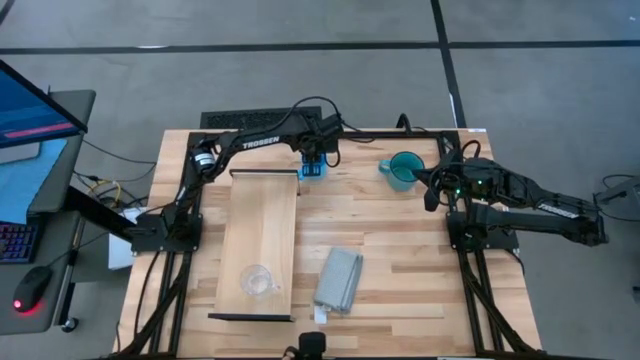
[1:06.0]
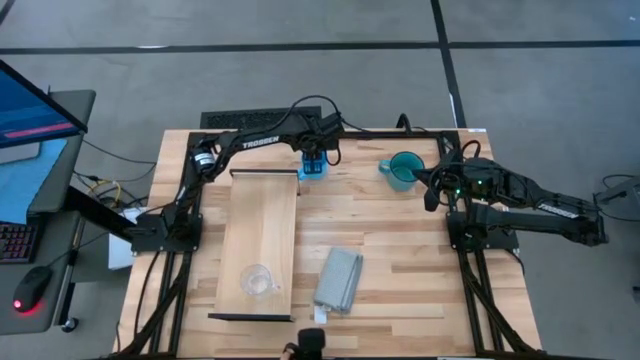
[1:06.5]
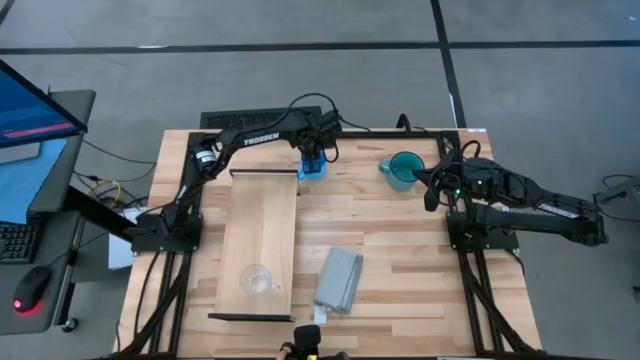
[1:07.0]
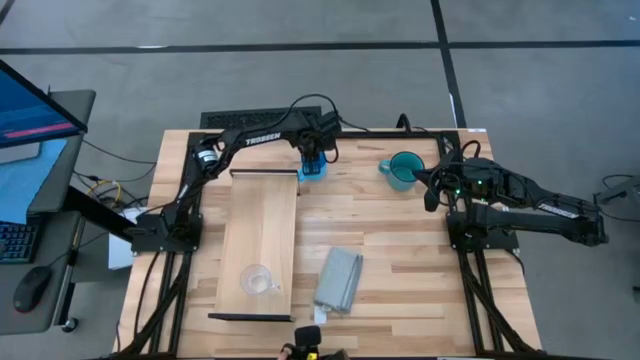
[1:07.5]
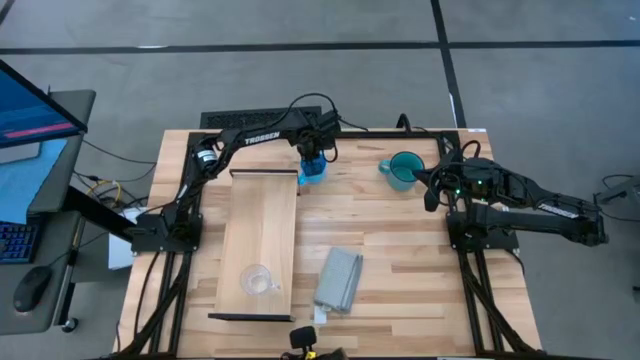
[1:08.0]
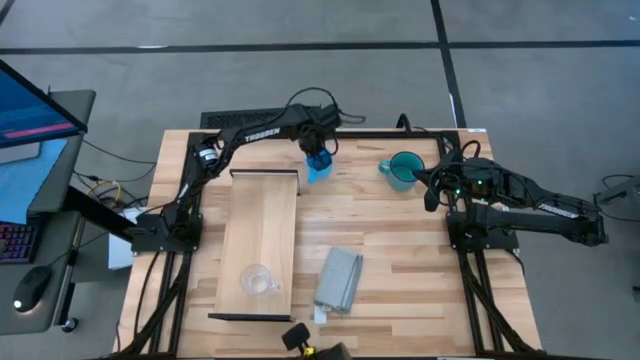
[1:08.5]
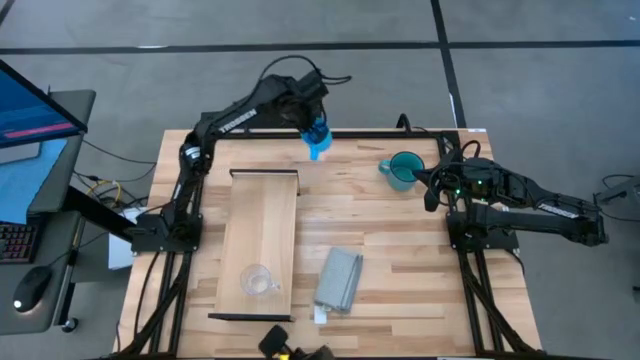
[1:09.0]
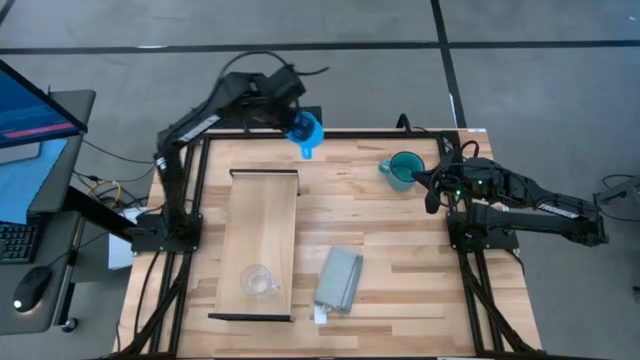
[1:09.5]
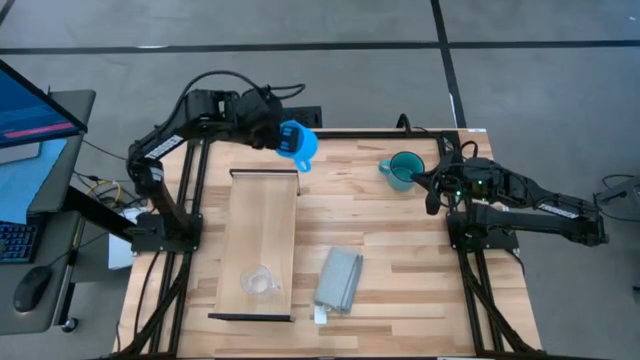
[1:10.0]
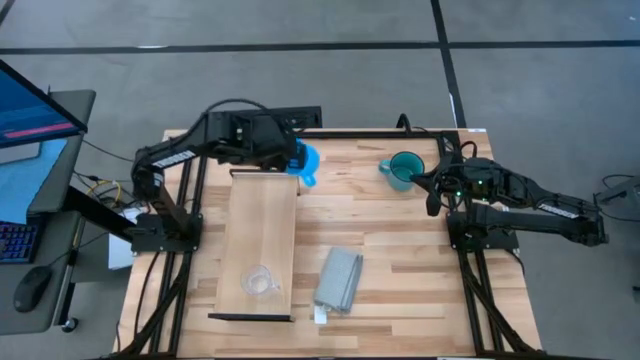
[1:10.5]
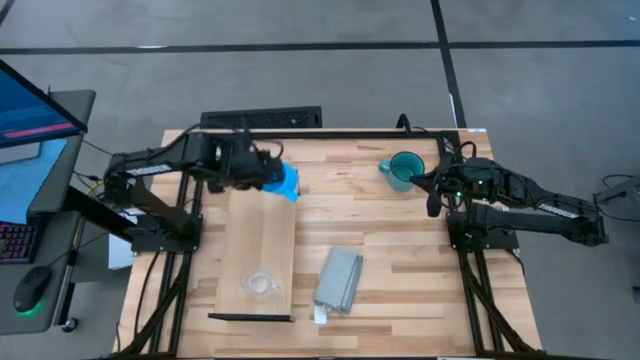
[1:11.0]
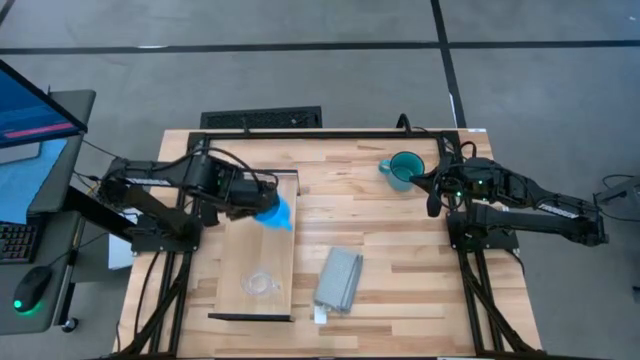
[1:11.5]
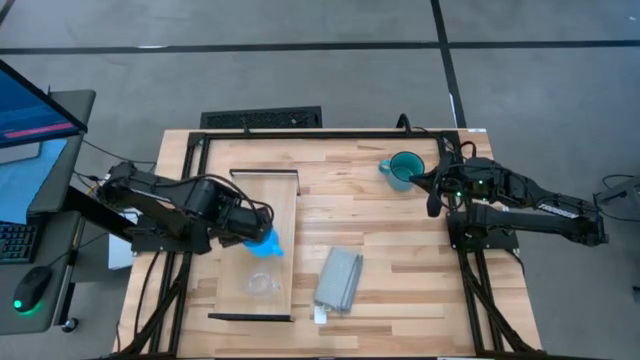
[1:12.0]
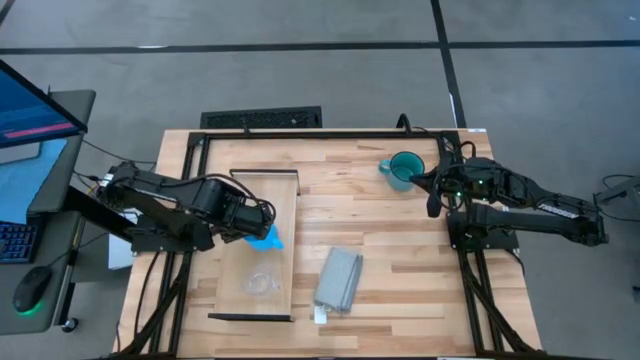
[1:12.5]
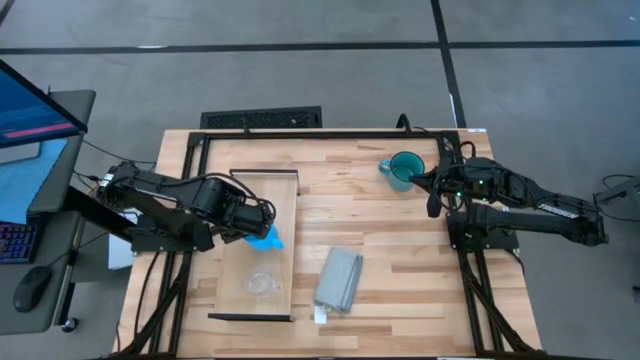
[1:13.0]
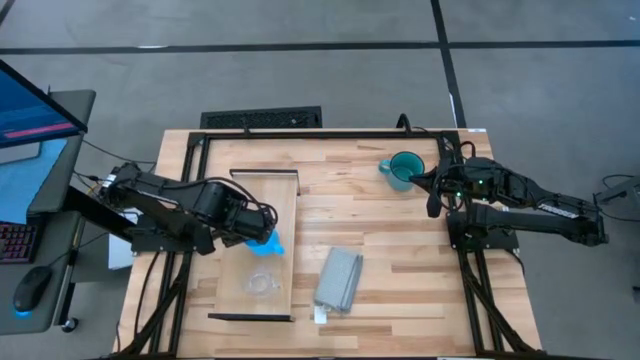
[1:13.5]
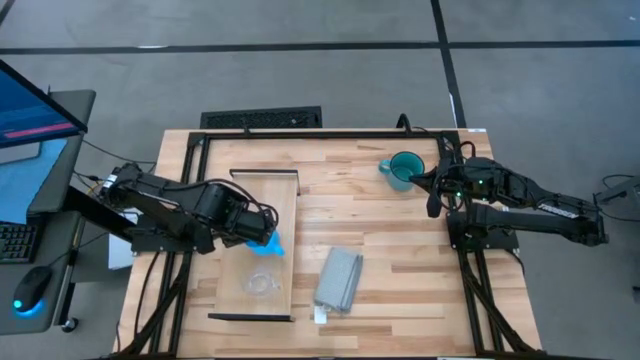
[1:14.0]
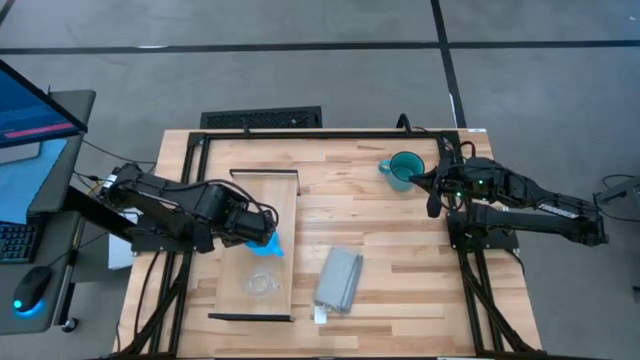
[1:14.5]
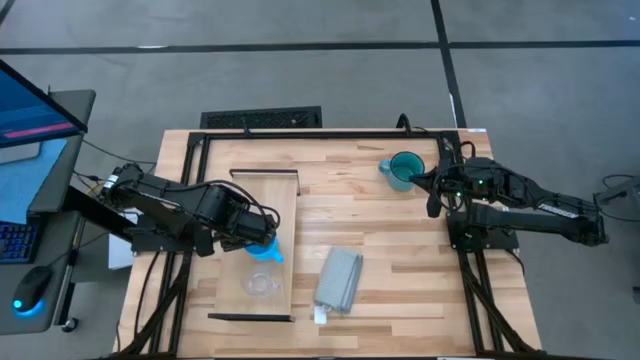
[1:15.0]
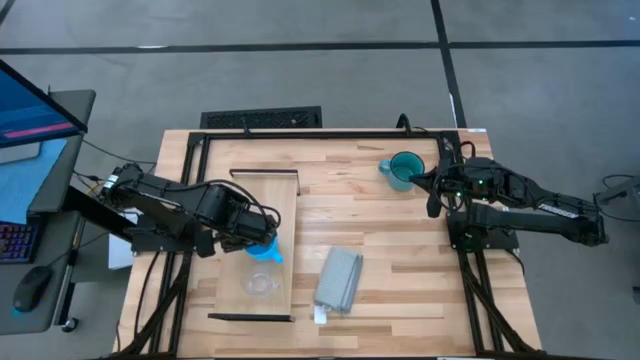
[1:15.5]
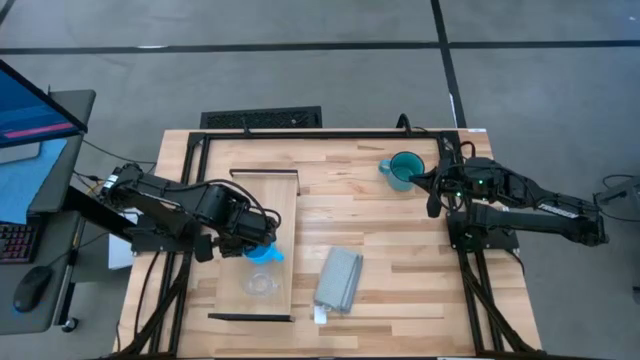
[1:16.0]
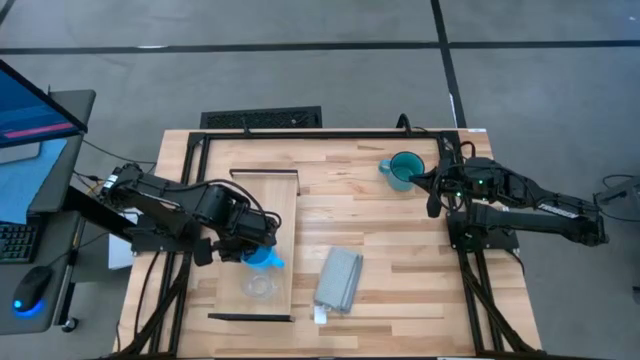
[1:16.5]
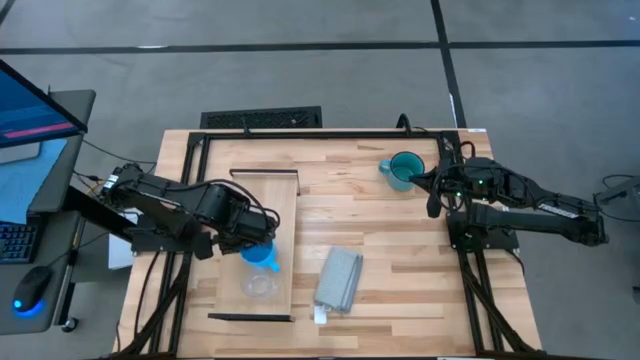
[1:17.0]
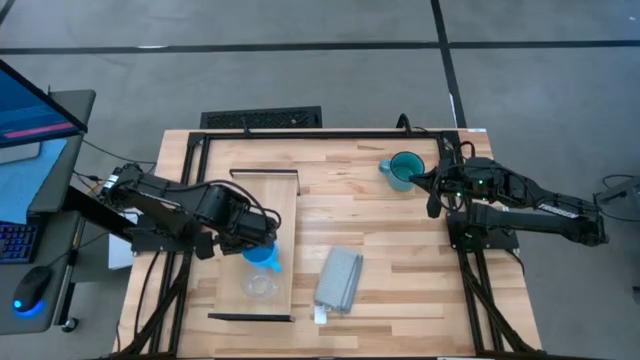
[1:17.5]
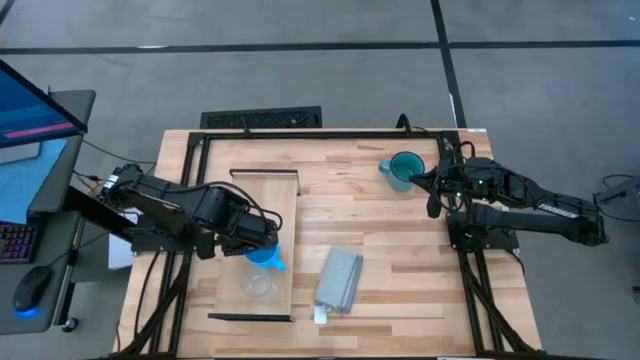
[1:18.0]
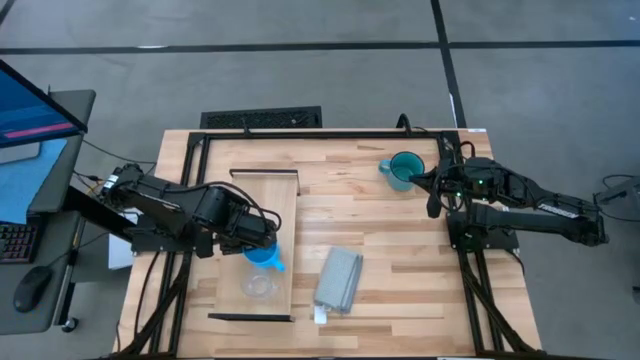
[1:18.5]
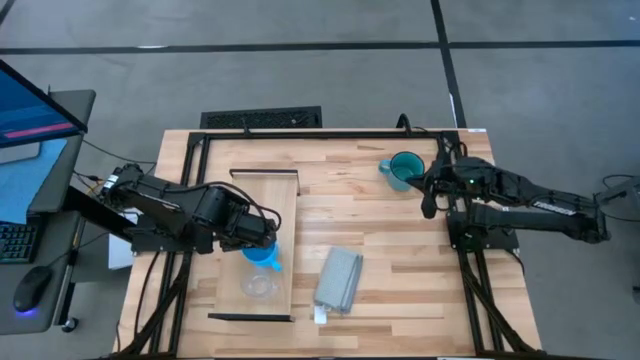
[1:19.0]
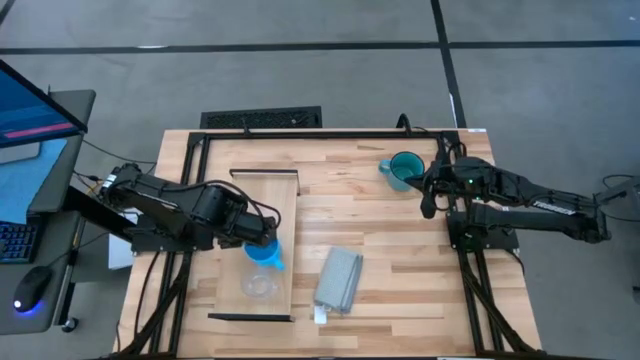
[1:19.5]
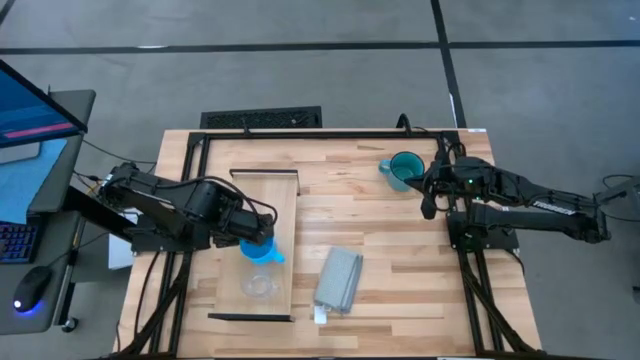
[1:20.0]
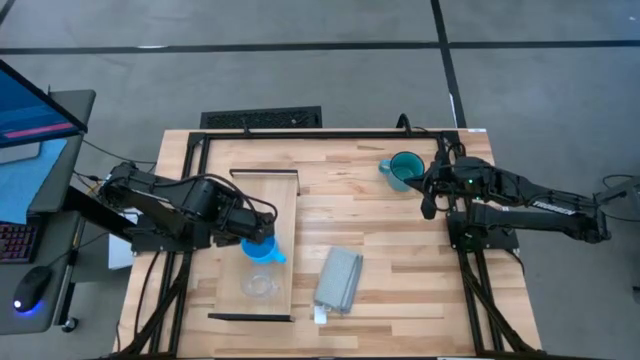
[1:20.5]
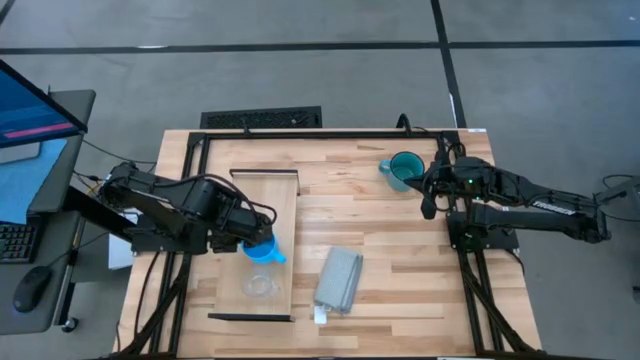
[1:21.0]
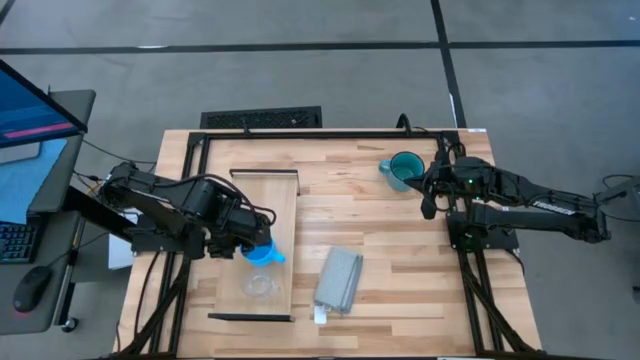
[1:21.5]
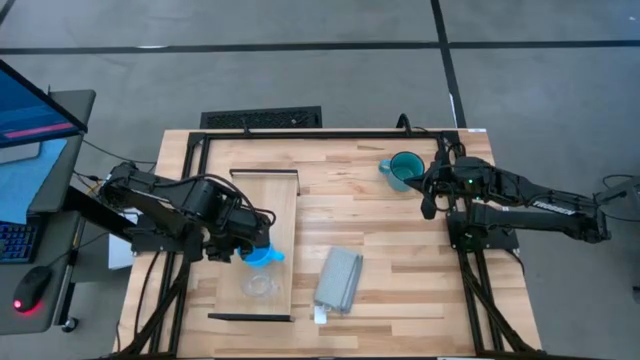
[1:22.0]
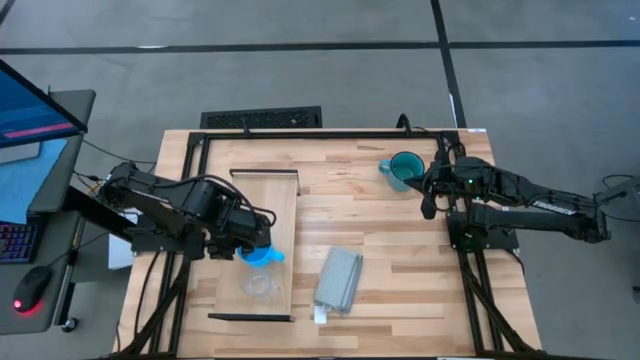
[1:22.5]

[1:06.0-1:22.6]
Task: Stack small to large cups/mugs on shelf
Put the light blue mug on the shelf
